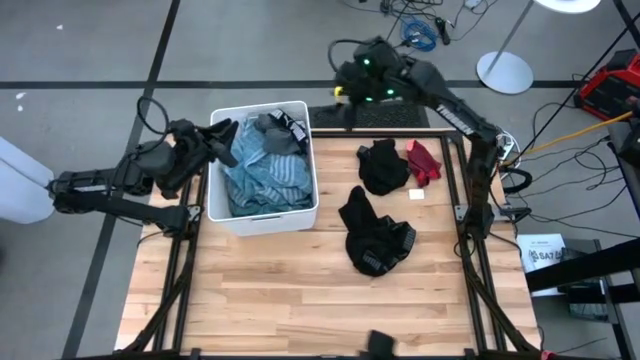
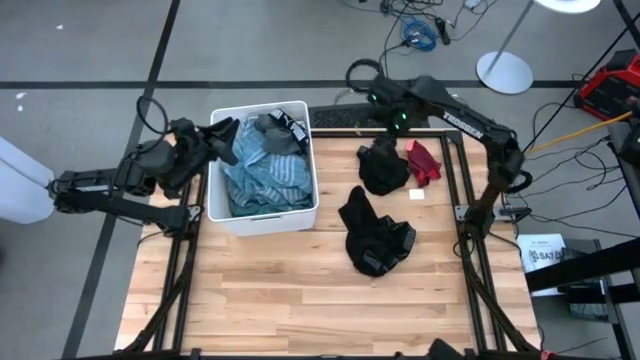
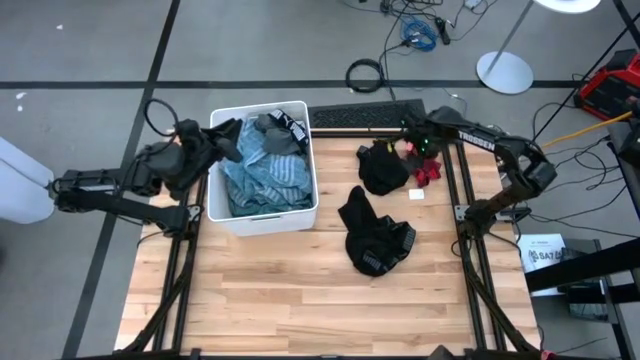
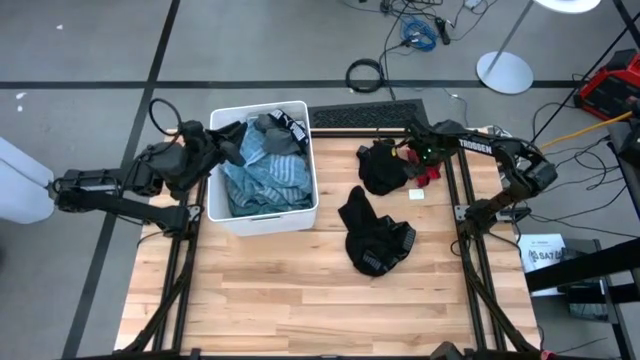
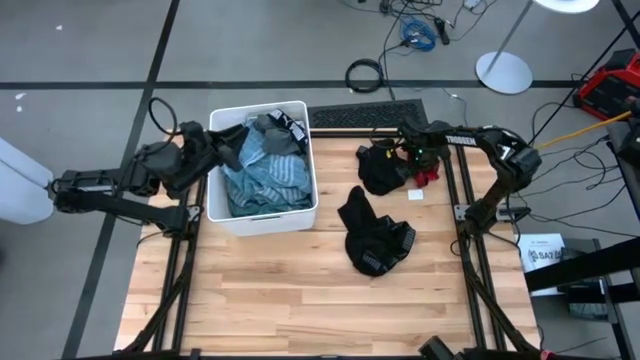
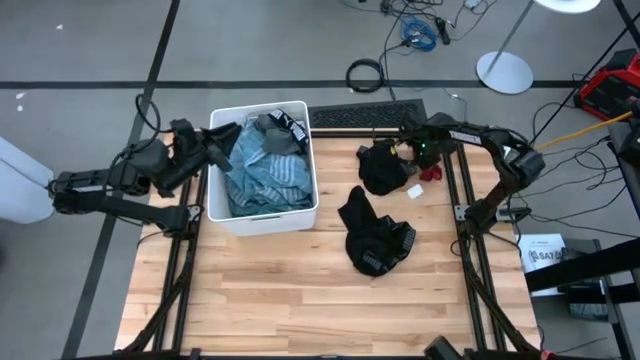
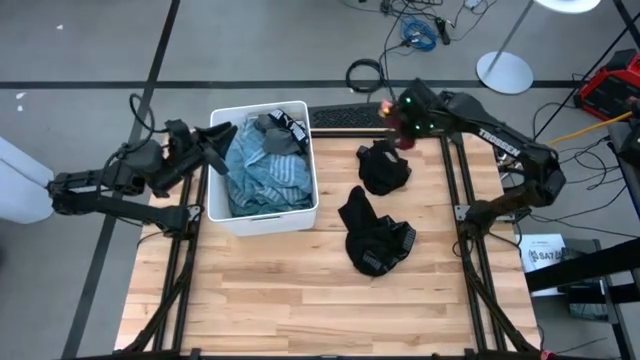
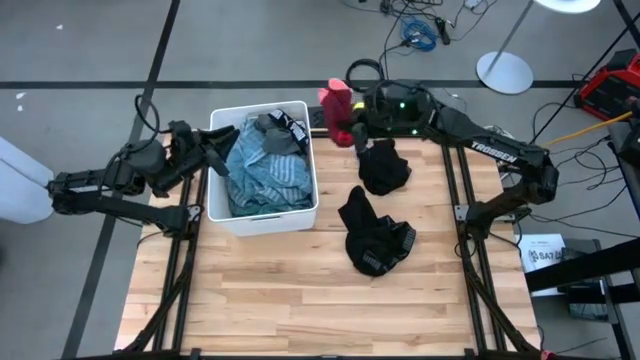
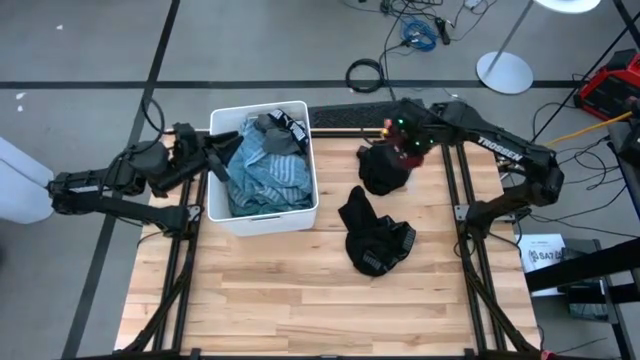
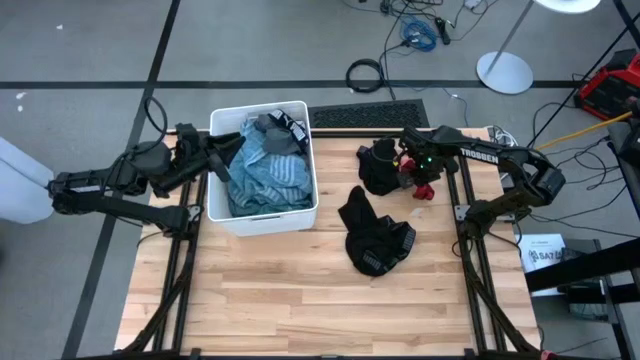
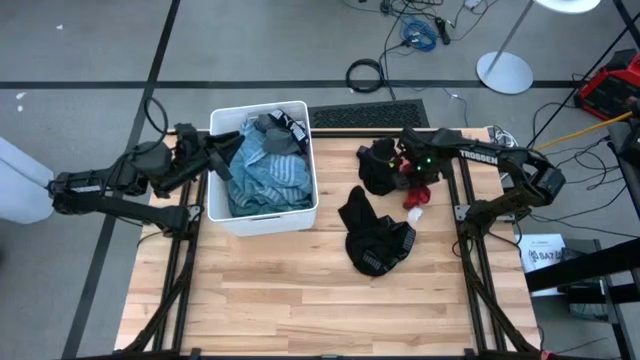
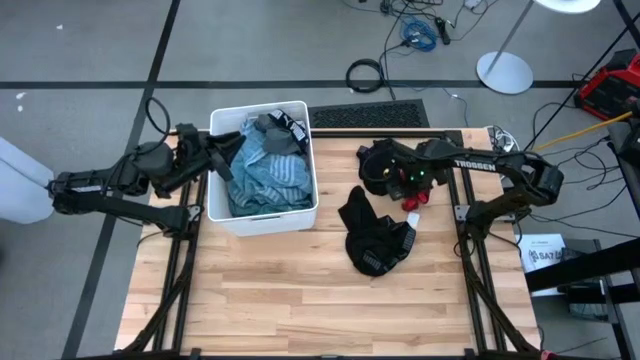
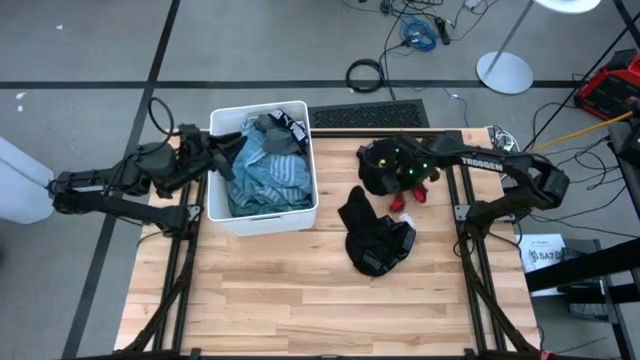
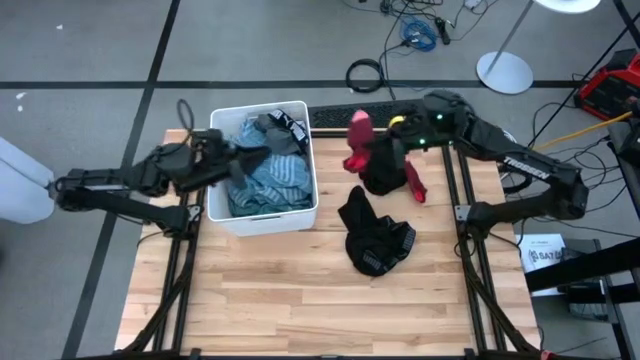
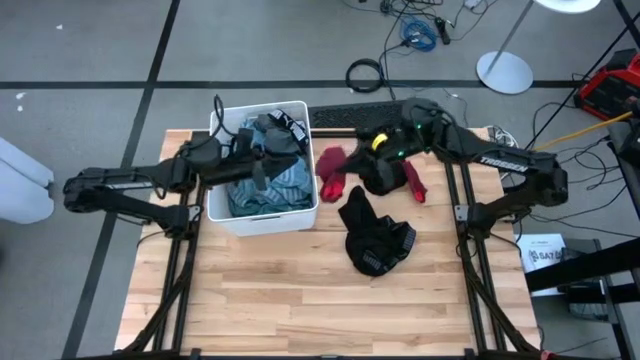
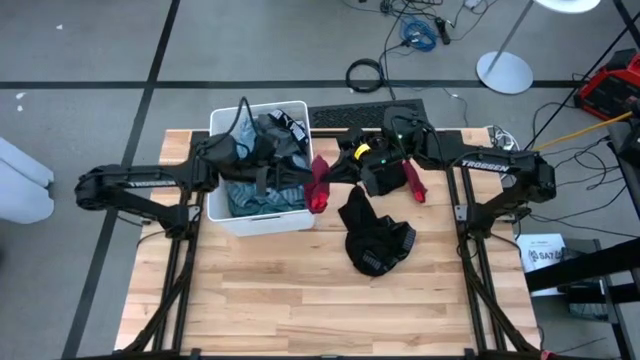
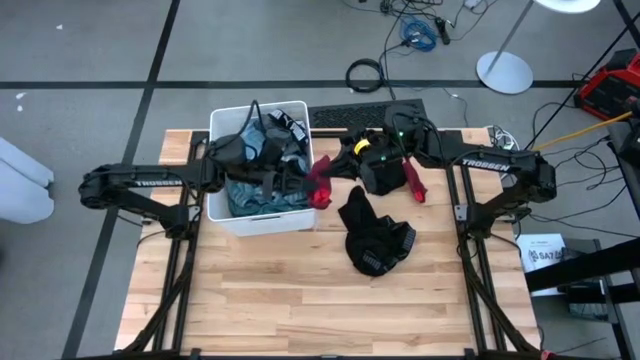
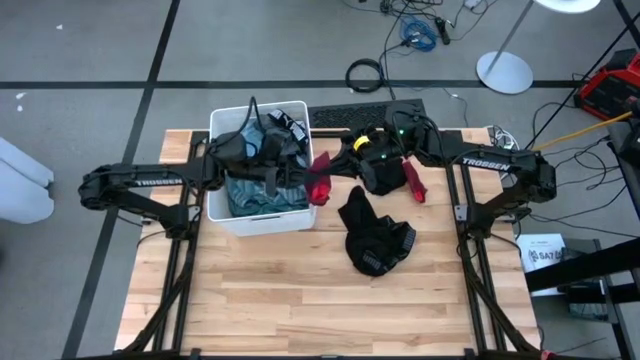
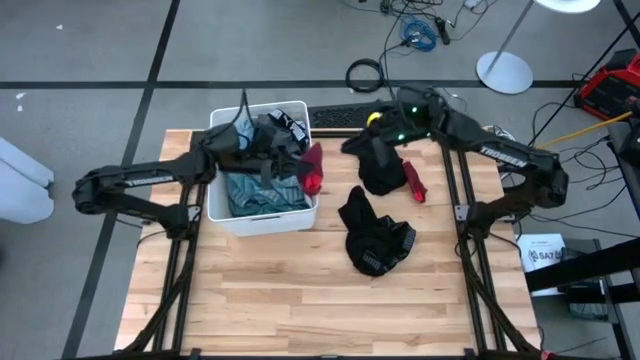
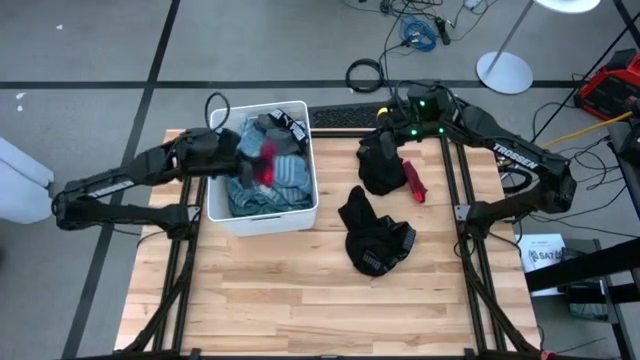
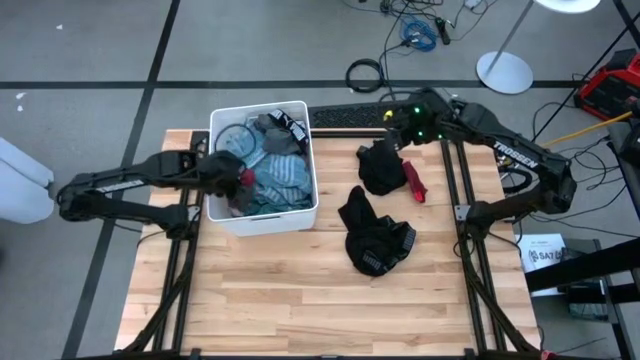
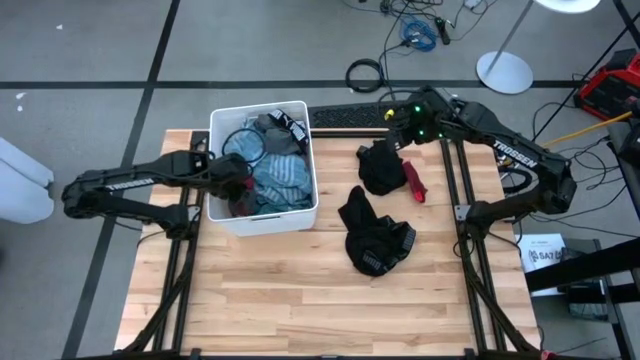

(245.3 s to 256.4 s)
Task: Sort clothes
Put the left red sock into the white laundry bin

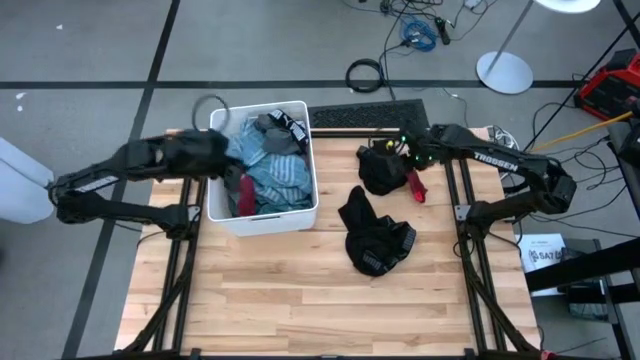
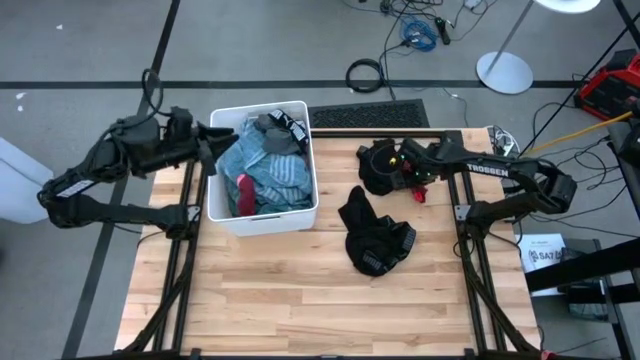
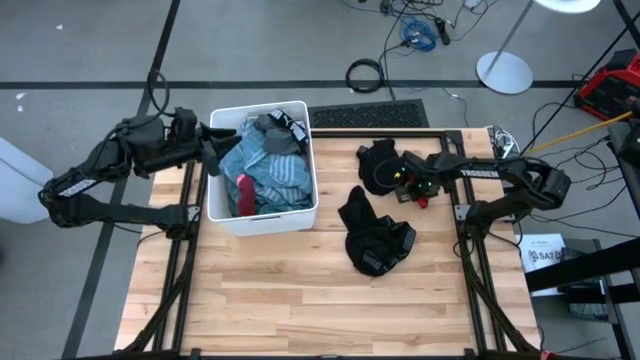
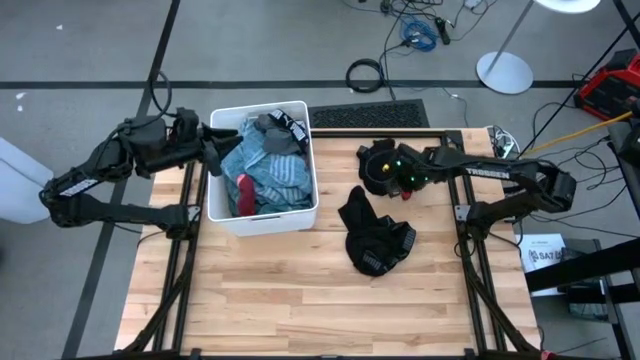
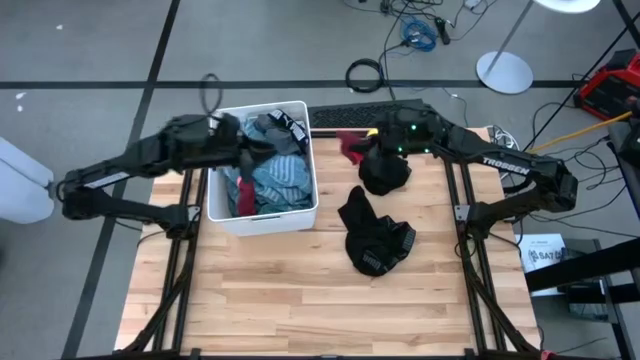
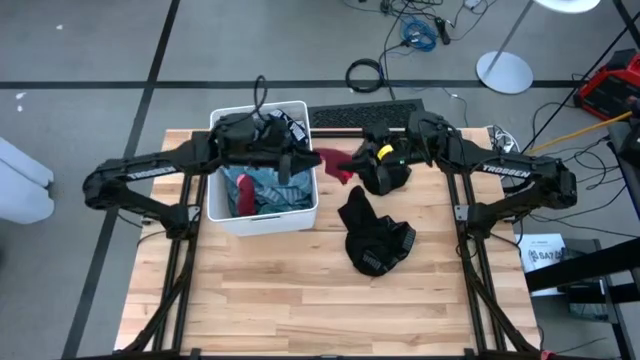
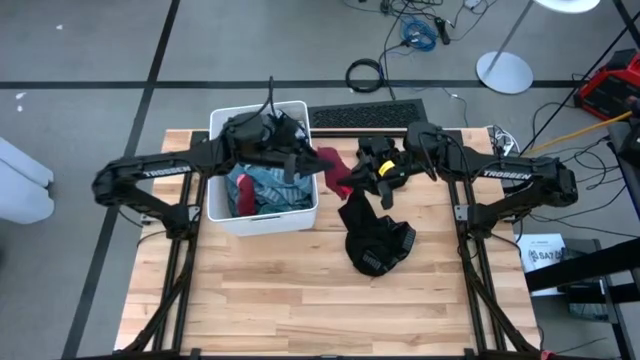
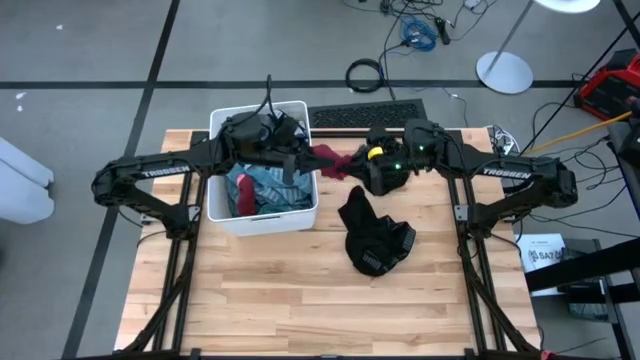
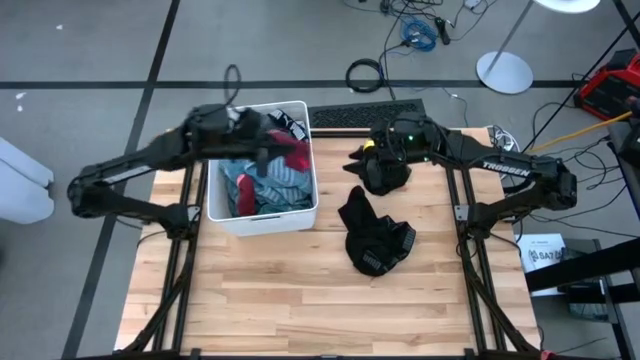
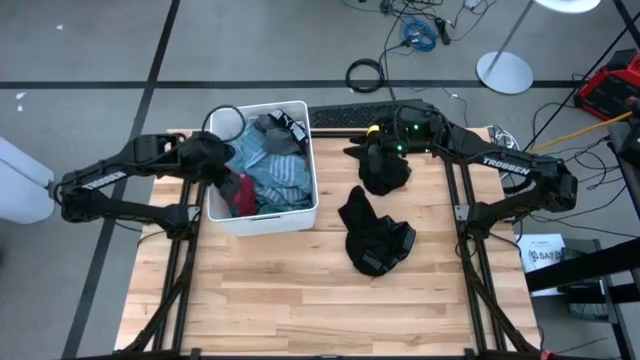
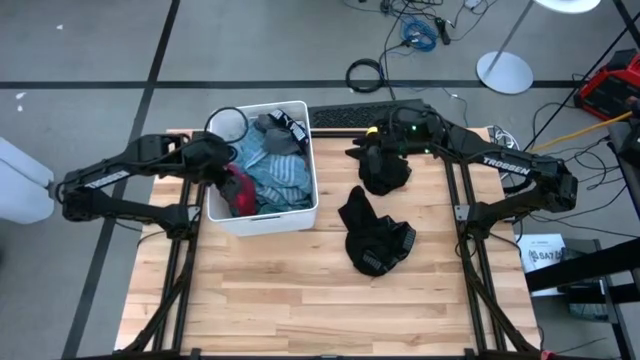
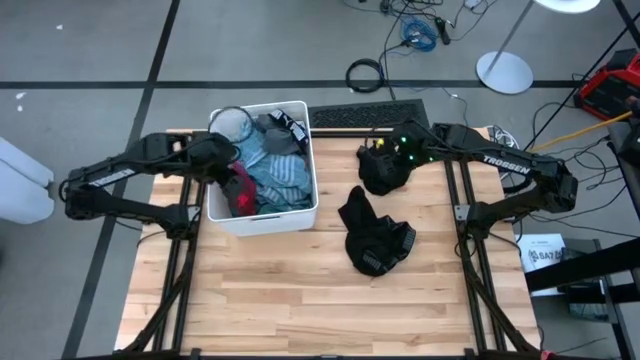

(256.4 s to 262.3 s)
Put the red sock into the white laundry bin

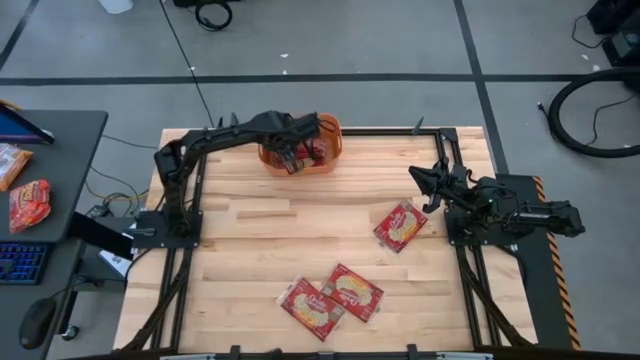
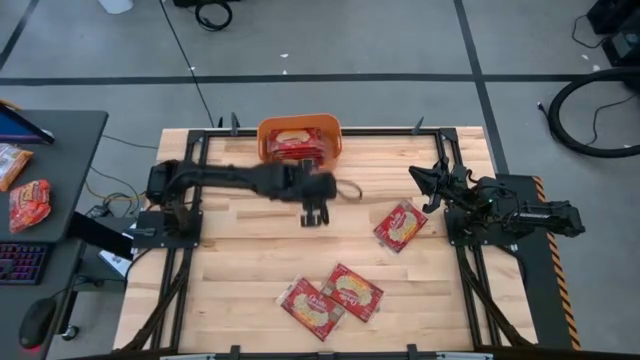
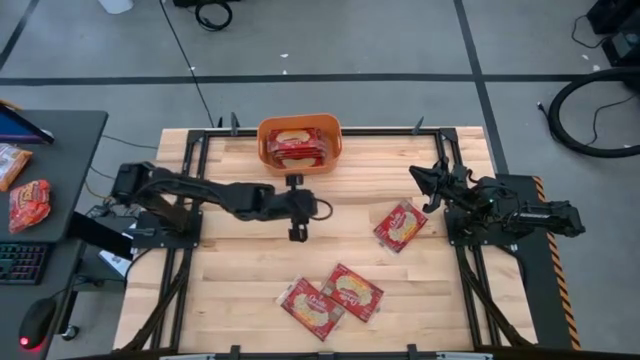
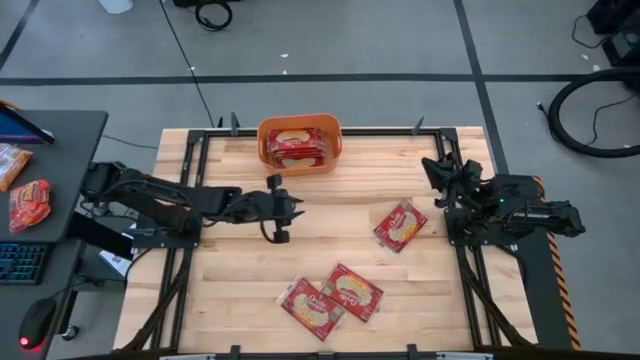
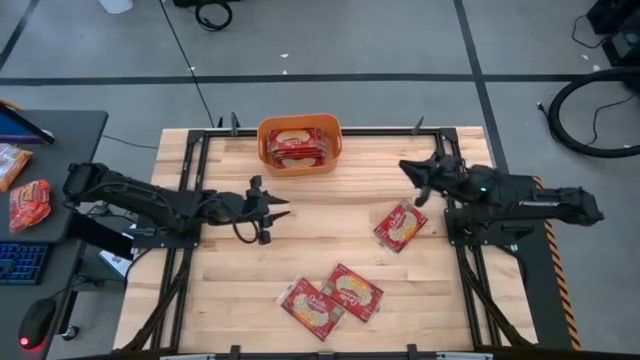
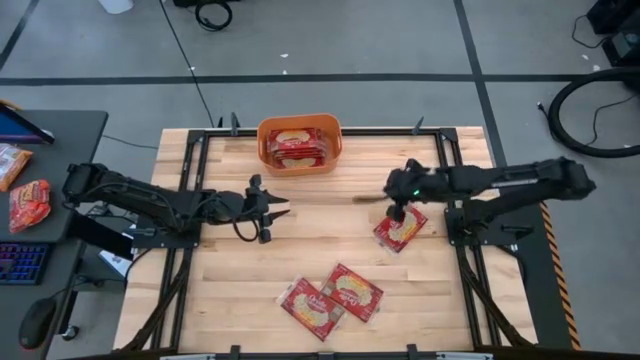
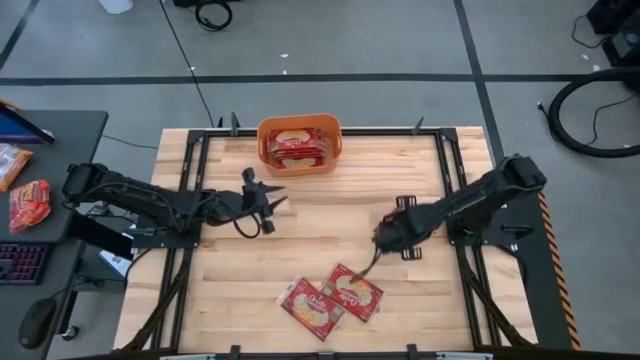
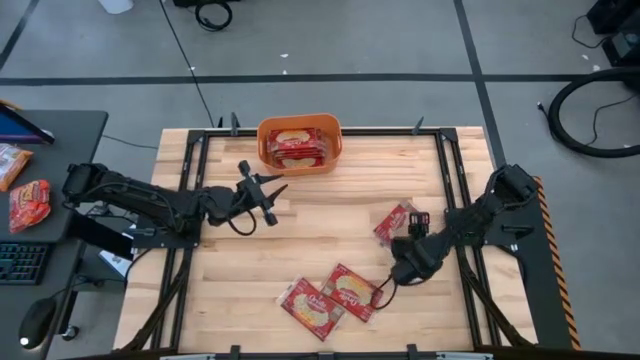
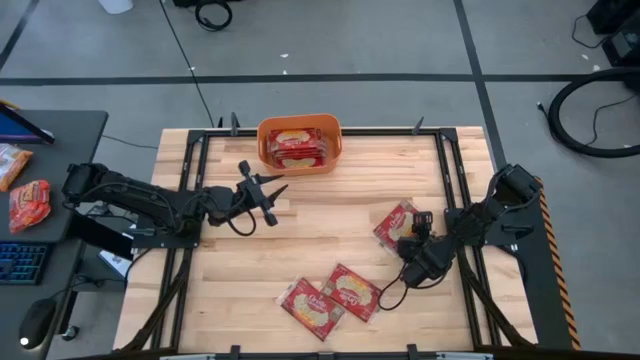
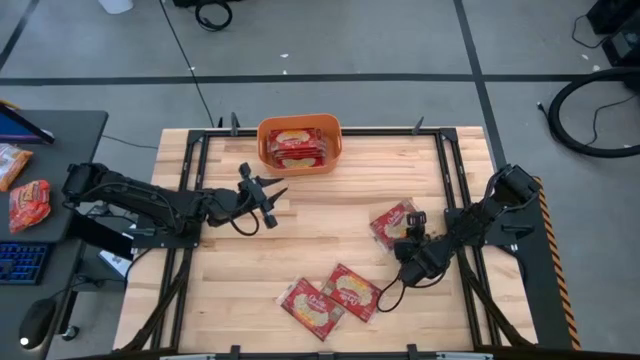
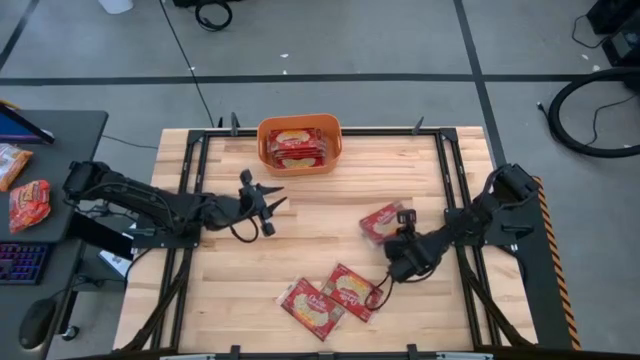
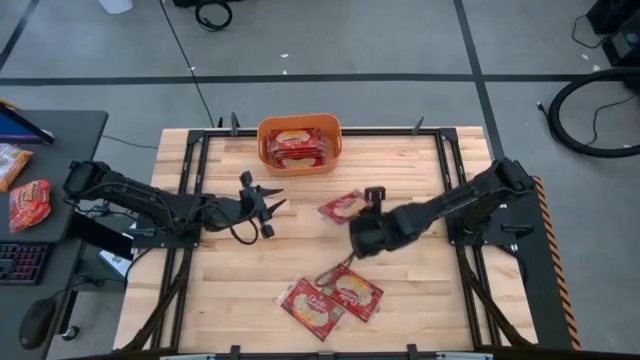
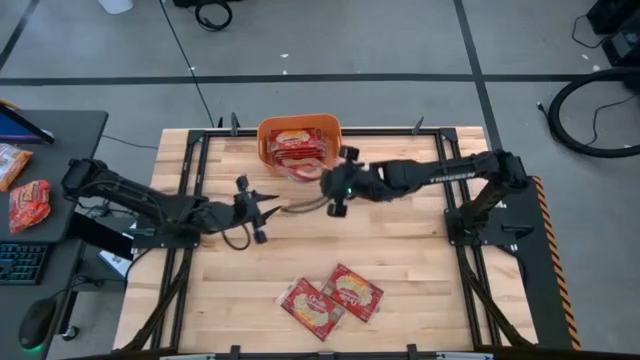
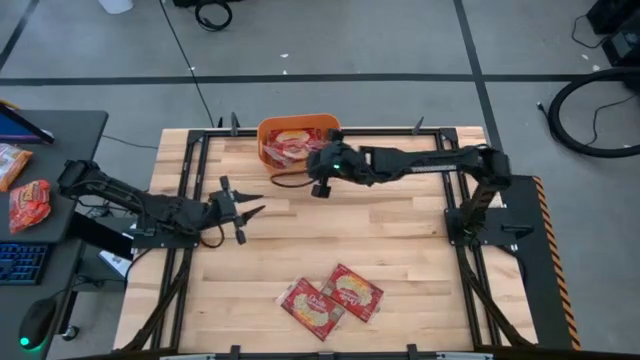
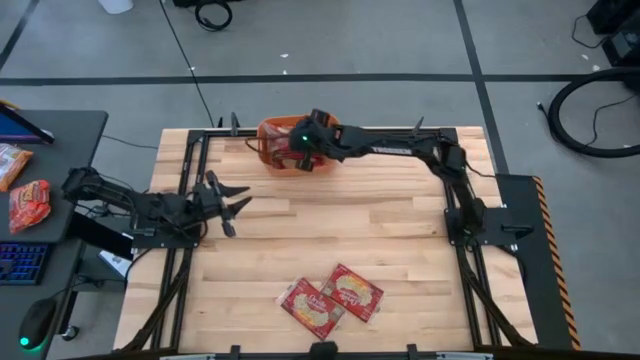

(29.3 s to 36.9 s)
Task: Sort popcorn bags into baskets
Put the red popcorn bag into the orange bin
